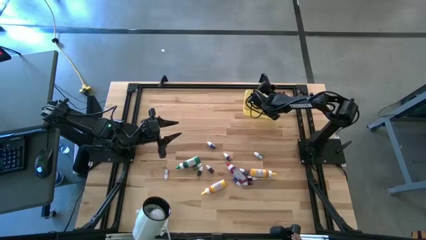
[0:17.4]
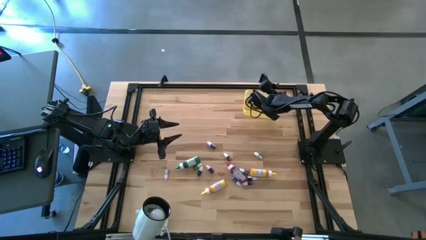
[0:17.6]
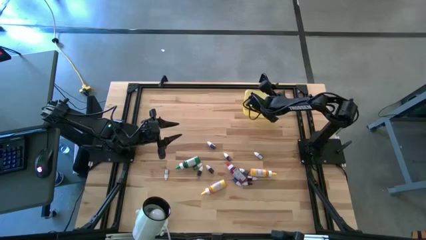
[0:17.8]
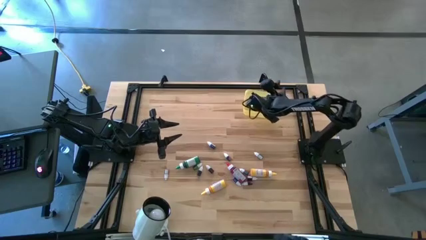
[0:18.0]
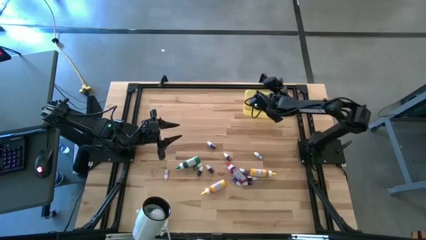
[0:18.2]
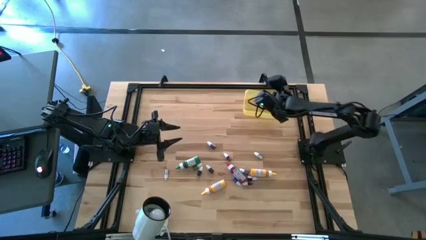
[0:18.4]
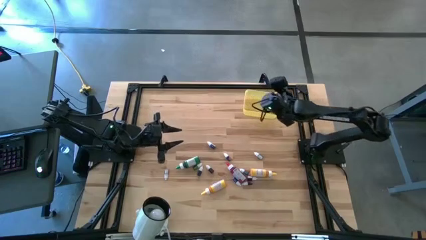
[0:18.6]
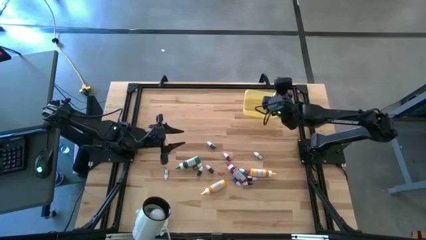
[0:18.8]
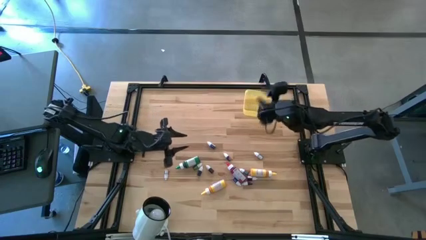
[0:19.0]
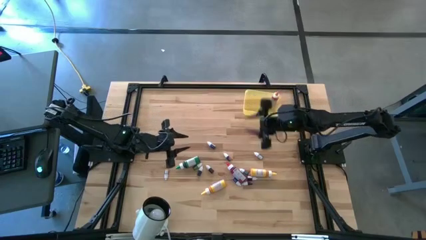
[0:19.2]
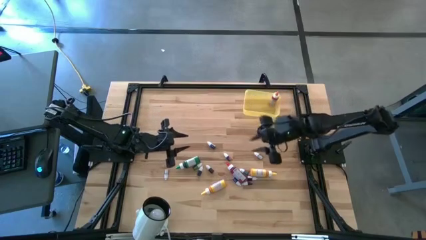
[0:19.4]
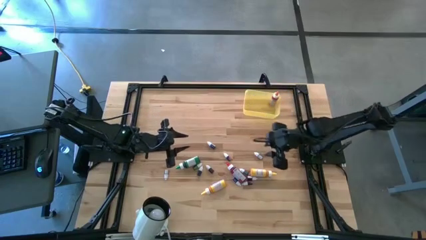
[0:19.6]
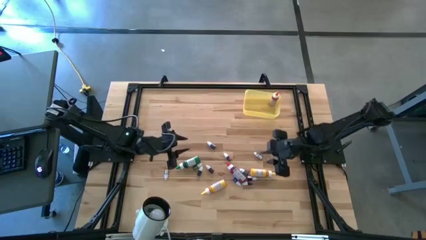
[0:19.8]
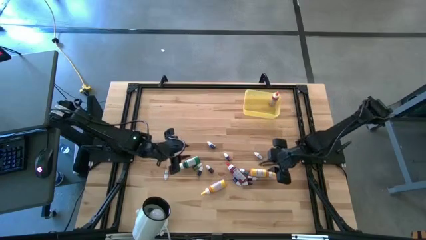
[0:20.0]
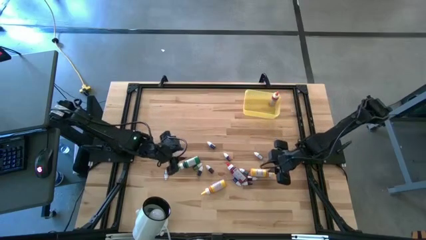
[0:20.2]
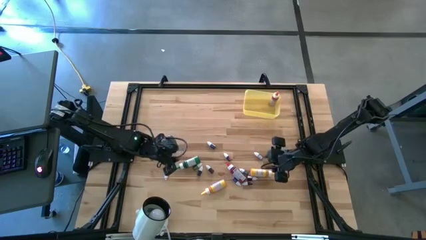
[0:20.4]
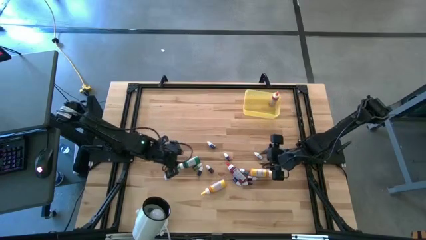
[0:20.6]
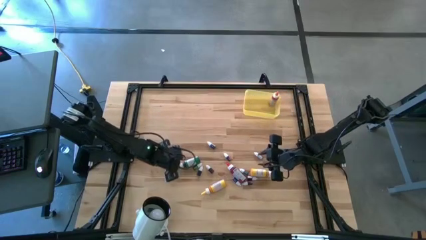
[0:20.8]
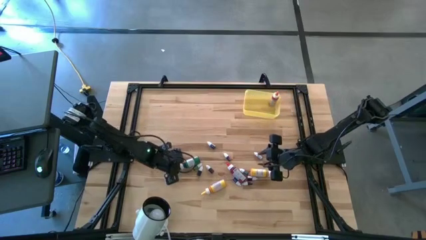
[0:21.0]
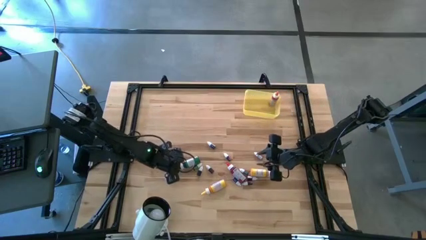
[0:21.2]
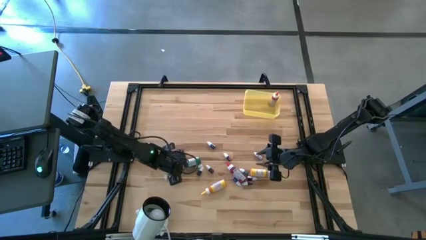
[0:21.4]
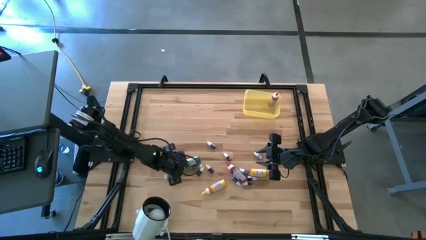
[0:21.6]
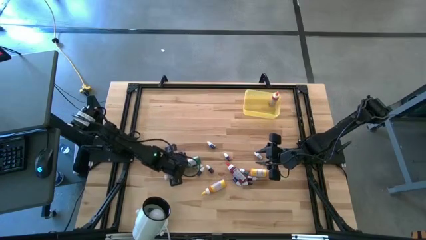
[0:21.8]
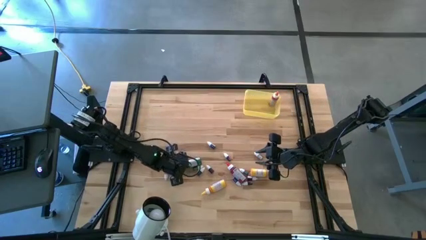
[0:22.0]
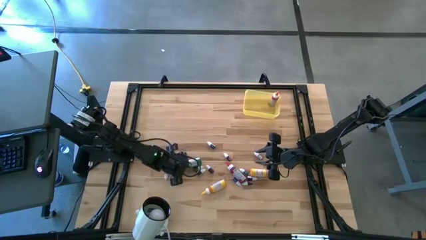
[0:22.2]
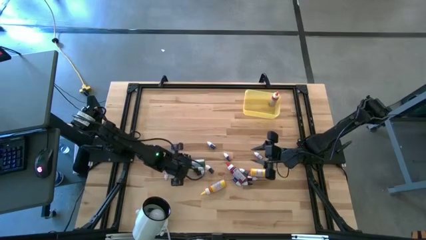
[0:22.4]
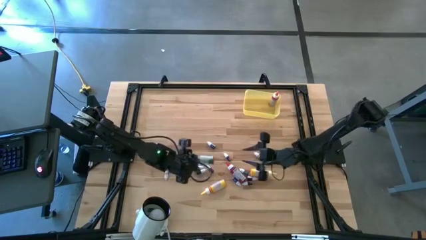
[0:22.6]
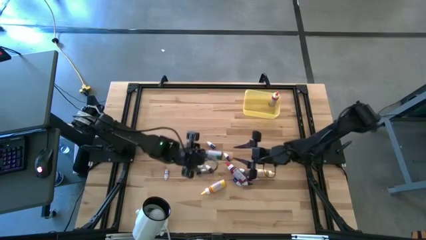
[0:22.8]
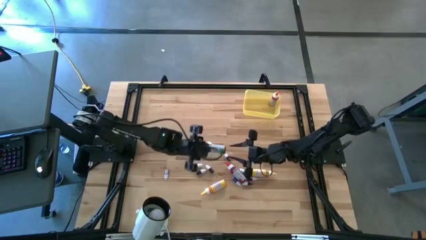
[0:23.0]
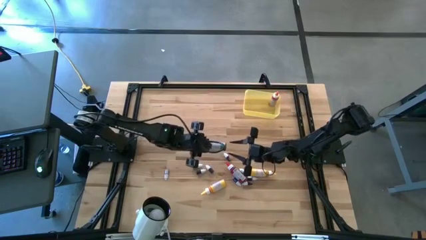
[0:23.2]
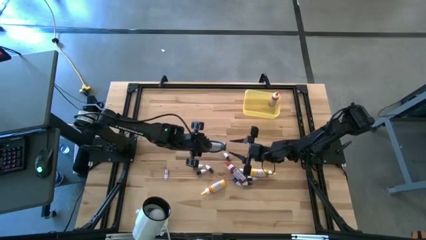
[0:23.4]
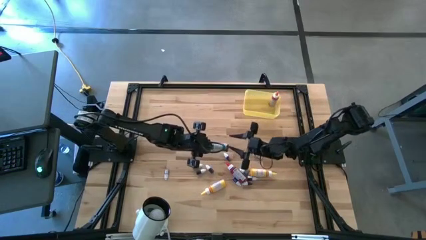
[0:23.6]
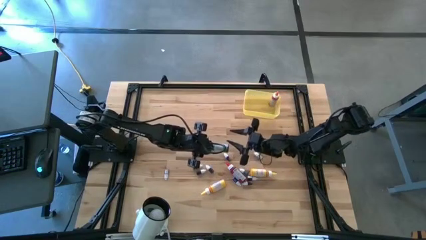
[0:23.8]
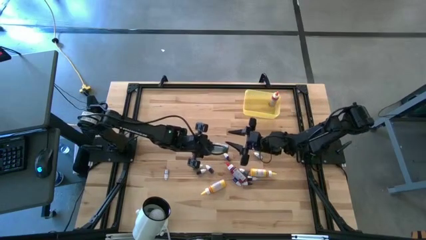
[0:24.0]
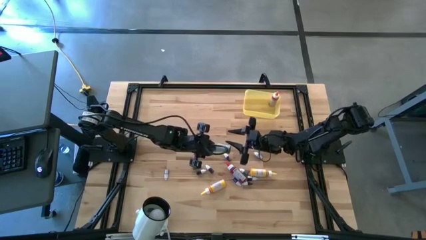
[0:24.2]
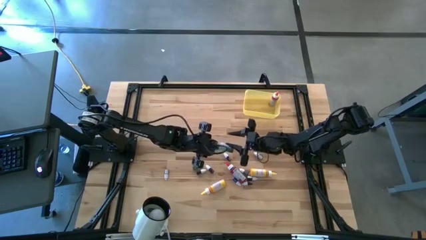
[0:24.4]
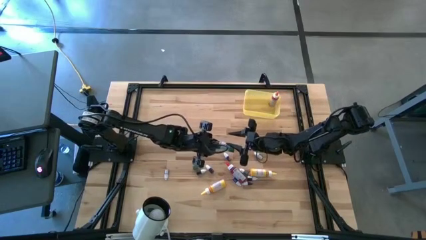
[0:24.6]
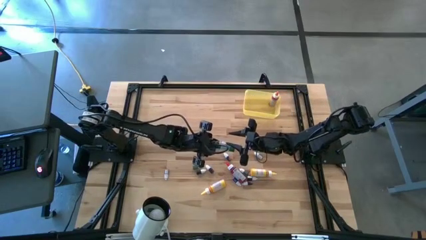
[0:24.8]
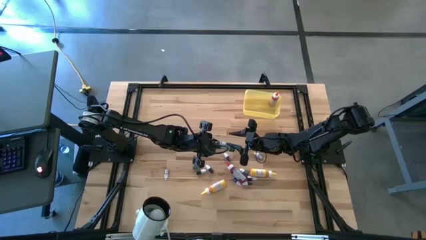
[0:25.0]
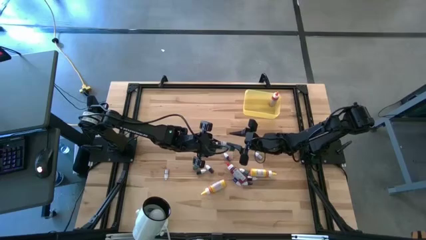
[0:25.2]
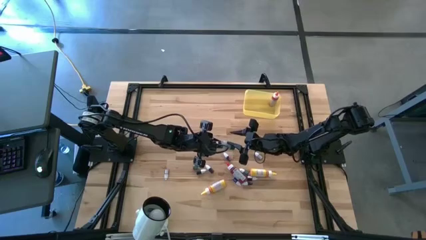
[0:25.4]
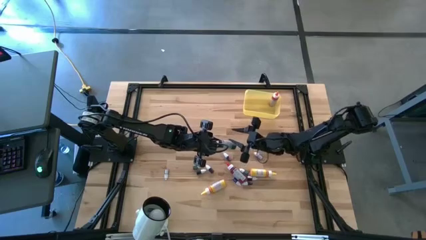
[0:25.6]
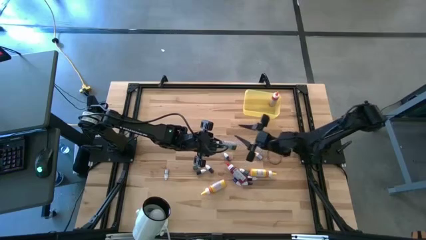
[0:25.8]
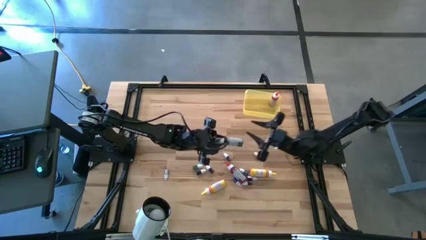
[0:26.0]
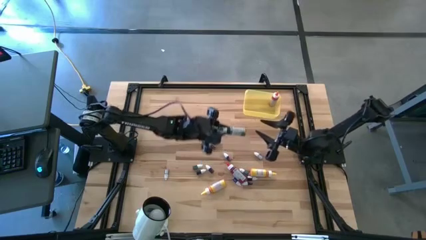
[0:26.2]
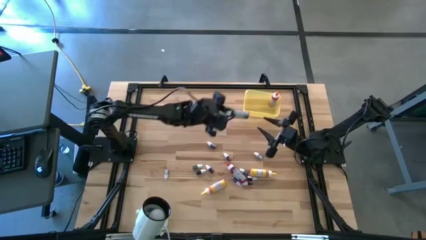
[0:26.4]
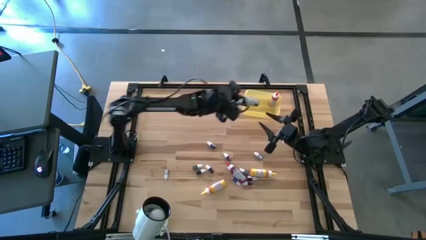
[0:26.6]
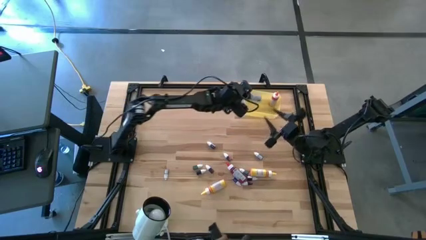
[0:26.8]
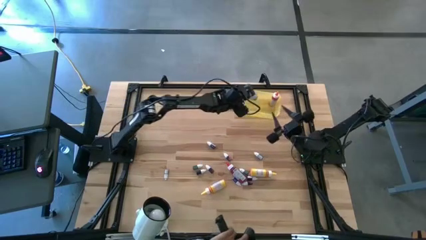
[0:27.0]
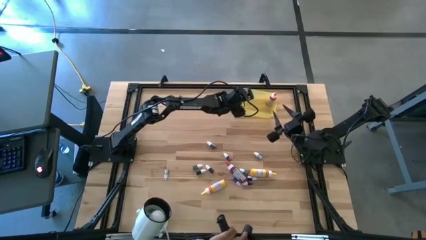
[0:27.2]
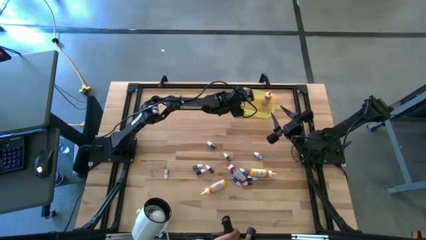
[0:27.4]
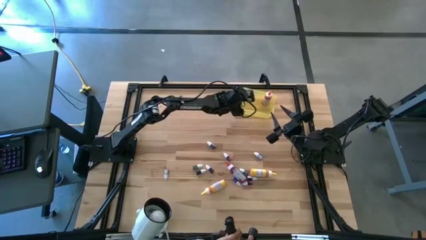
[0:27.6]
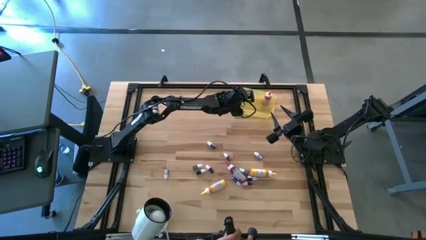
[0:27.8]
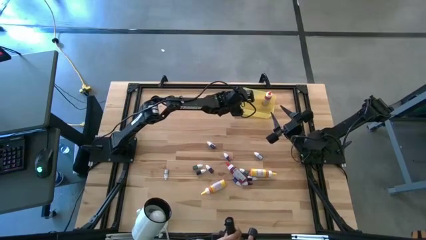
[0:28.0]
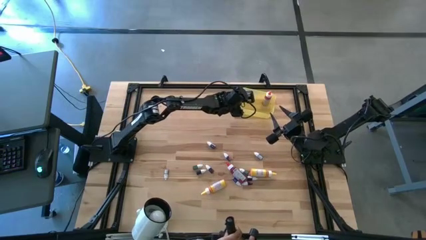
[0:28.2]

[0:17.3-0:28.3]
Task: Pick & Place food coloring
Put the big green food coloring bottle into the yellow bin
